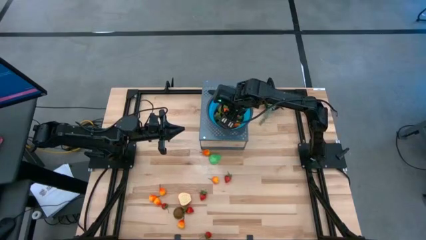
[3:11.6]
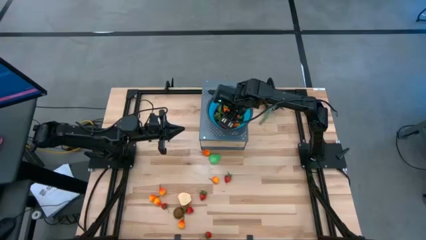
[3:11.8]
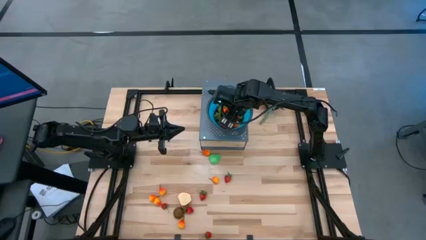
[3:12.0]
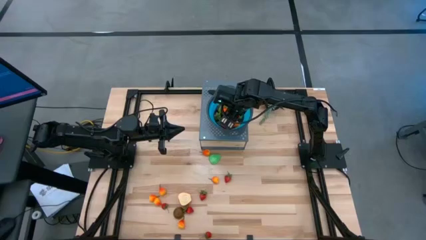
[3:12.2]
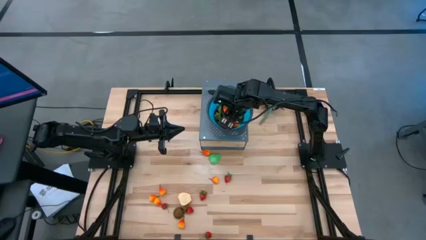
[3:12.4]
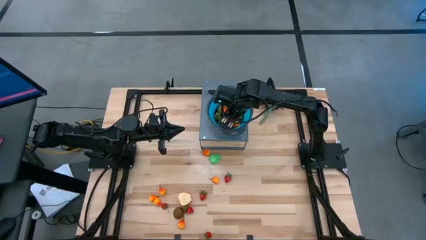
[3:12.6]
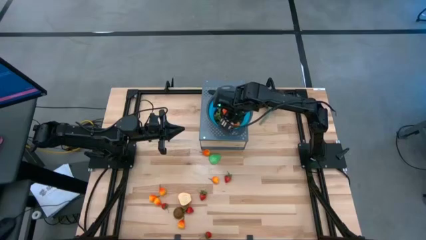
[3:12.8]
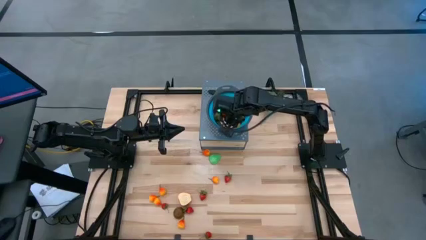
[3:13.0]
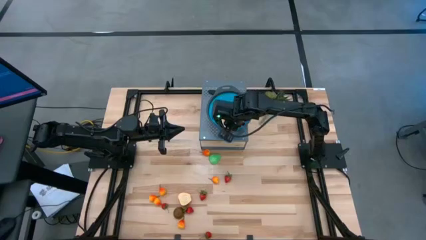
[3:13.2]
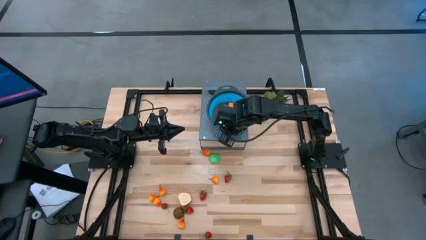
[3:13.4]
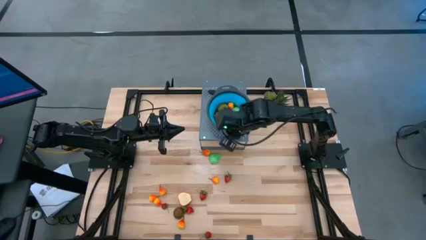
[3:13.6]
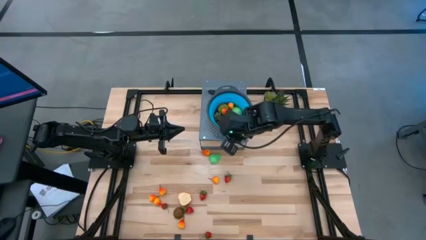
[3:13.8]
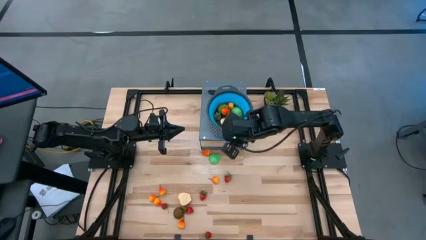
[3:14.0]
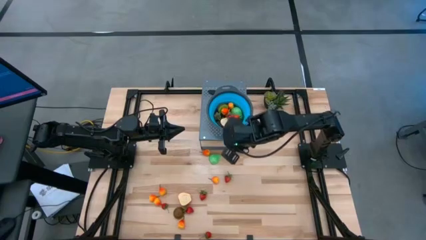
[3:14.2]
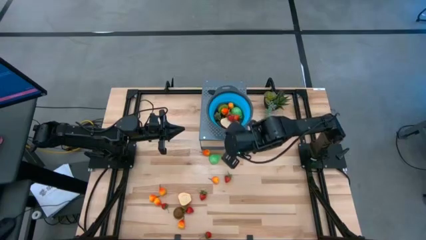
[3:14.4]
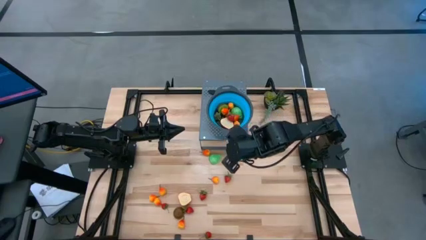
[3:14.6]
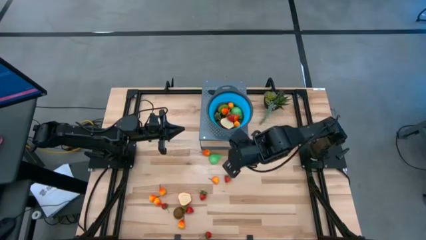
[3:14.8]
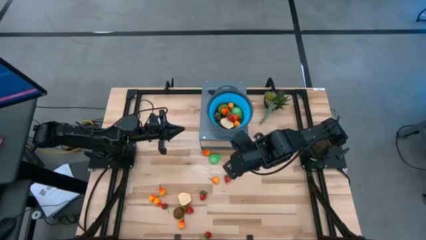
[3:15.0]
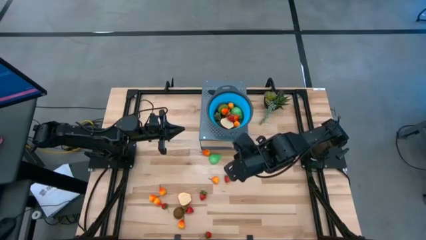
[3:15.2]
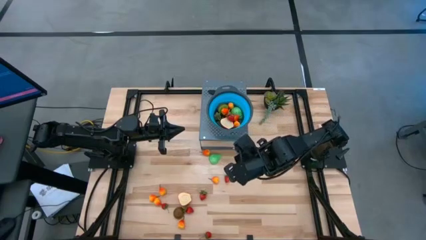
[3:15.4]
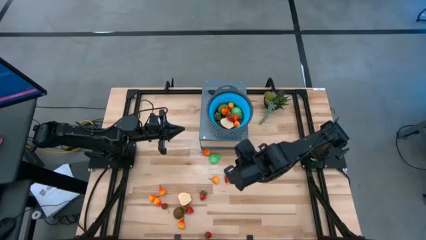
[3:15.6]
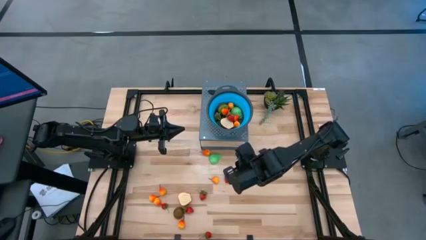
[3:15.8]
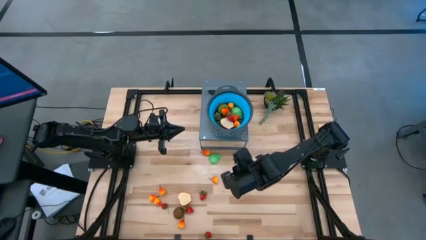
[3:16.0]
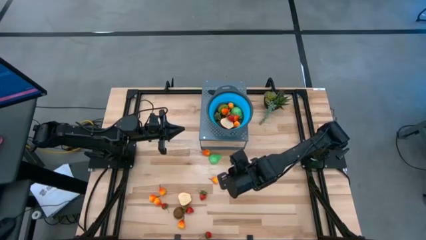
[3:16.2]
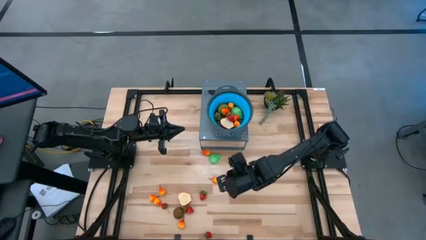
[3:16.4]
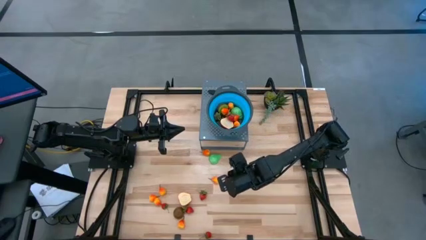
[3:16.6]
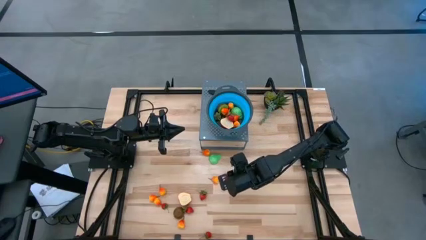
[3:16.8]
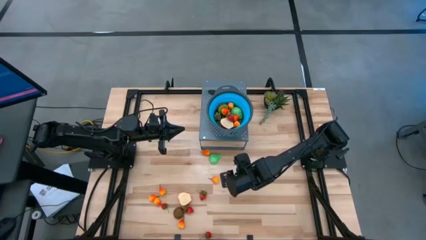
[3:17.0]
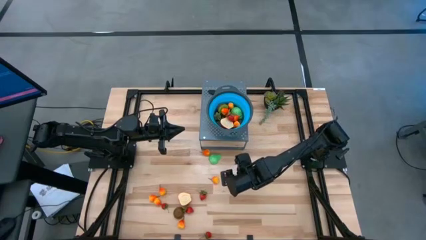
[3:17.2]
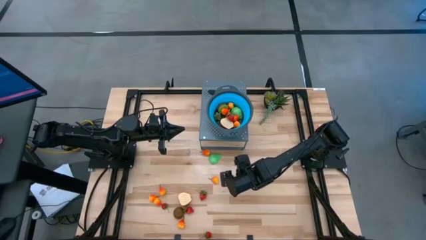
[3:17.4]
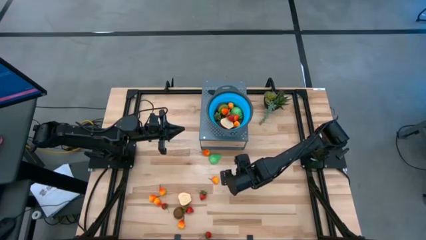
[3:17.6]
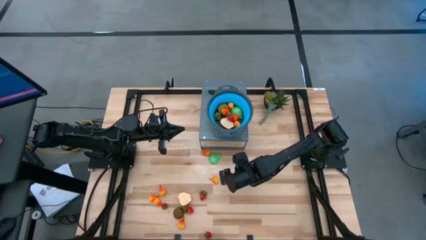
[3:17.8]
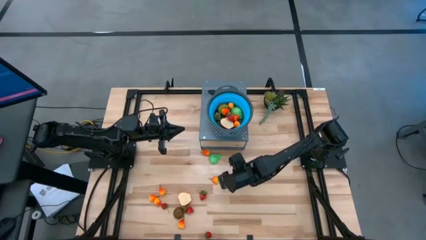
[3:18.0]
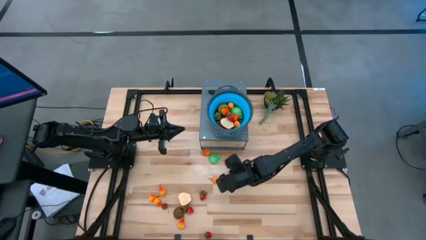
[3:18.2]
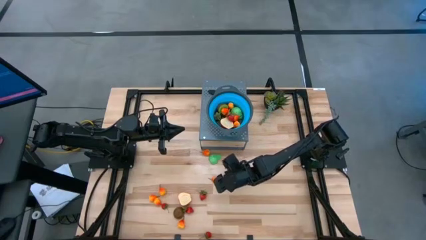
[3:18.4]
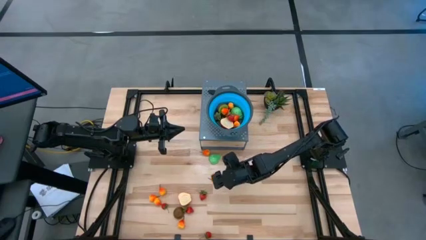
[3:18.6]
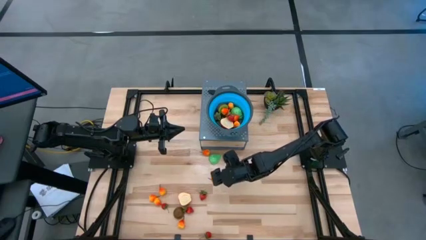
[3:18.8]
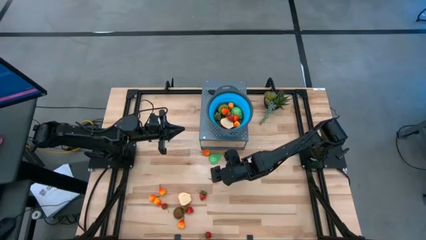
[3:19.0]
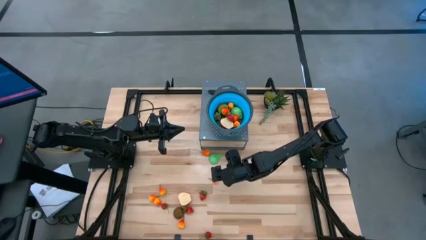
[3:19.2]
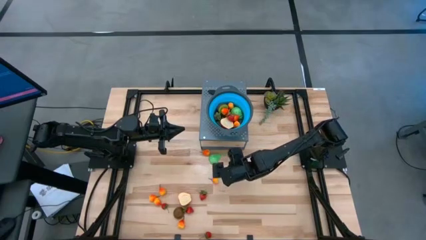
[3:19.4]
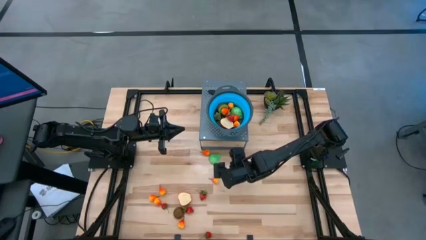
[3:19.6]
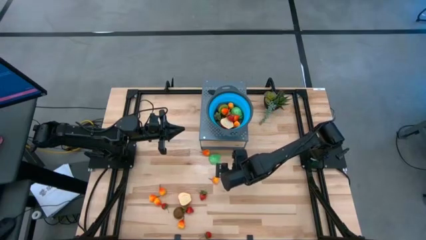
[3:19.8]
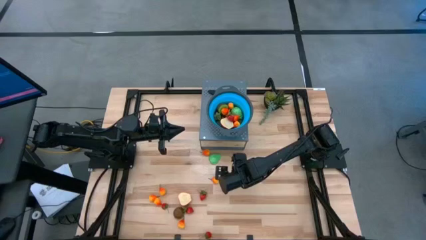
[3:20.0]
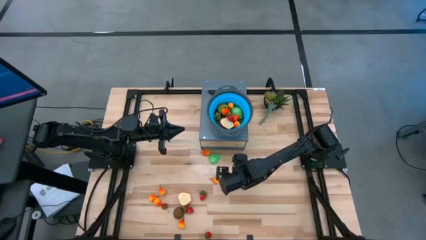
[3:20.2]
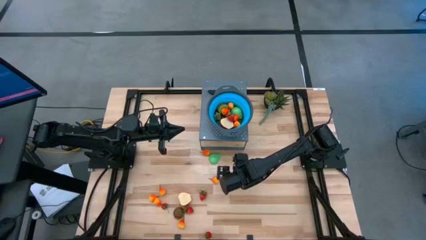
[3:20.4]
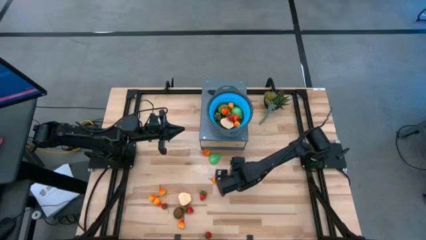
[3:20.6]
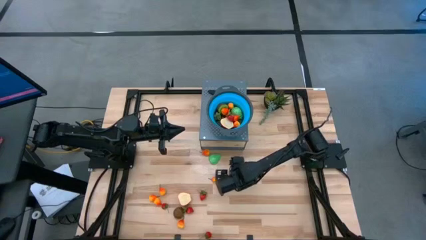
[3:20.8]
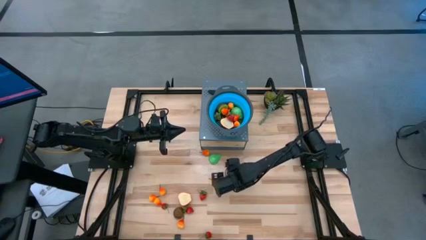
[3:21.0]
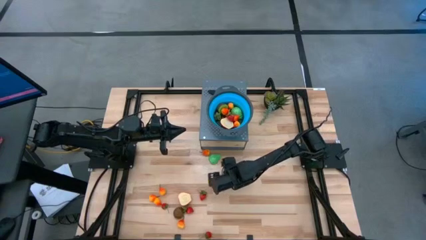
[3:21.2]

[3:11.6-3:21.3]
Task: Pick & Place Fruit
Put the strawberry into the strainer bowl

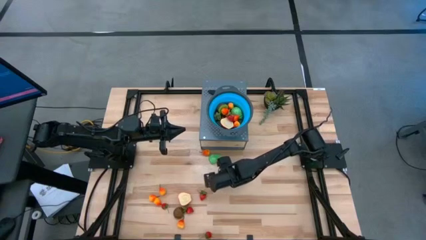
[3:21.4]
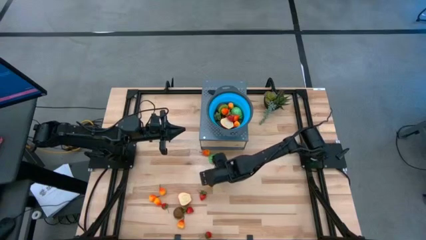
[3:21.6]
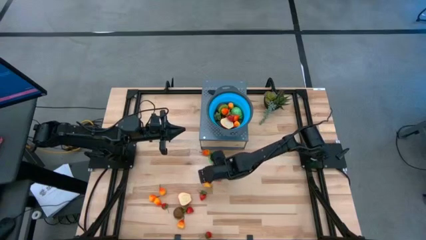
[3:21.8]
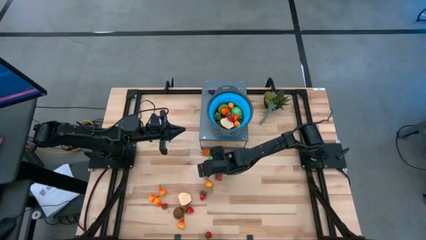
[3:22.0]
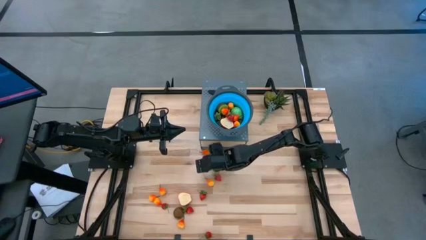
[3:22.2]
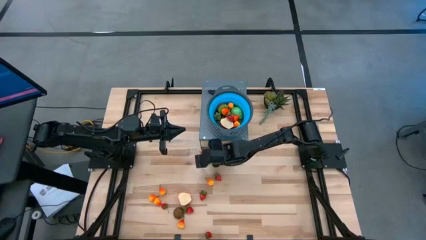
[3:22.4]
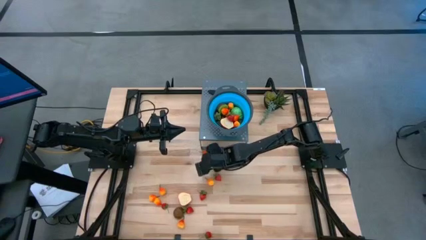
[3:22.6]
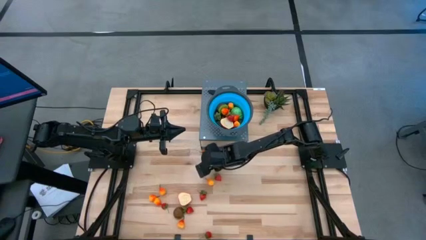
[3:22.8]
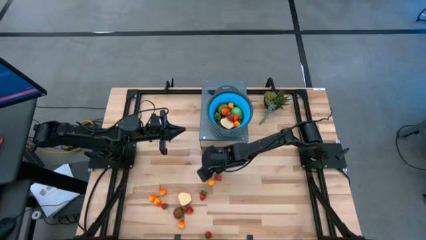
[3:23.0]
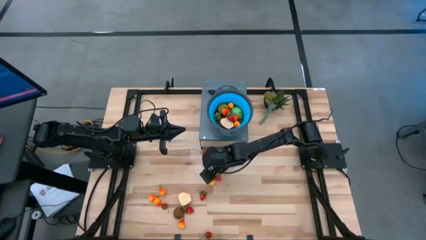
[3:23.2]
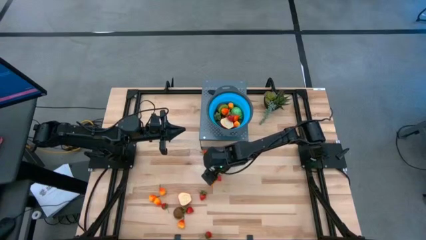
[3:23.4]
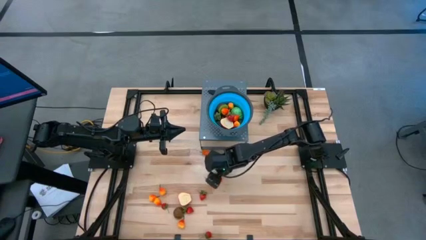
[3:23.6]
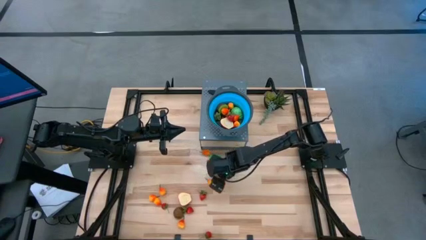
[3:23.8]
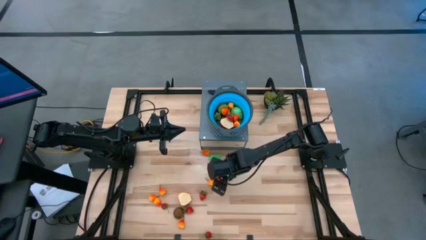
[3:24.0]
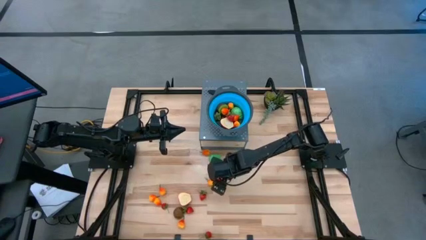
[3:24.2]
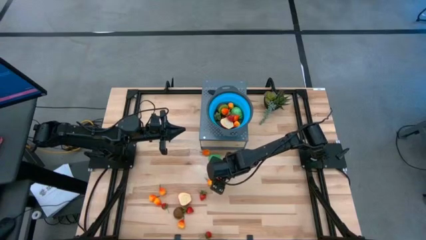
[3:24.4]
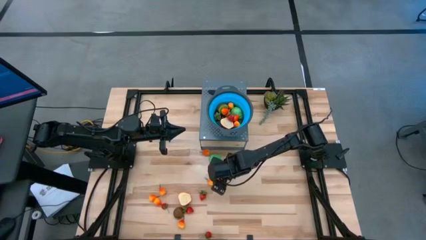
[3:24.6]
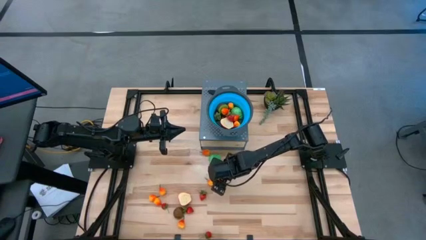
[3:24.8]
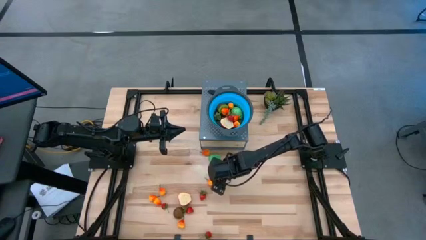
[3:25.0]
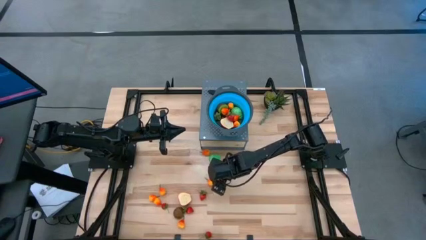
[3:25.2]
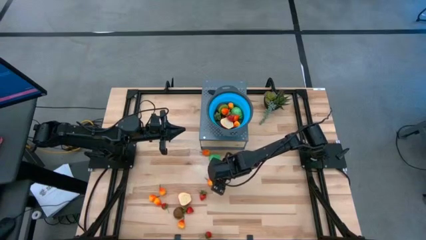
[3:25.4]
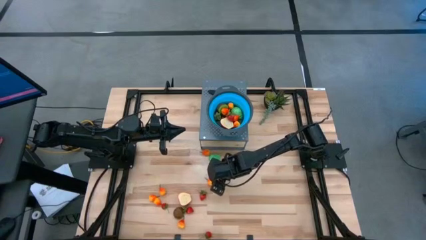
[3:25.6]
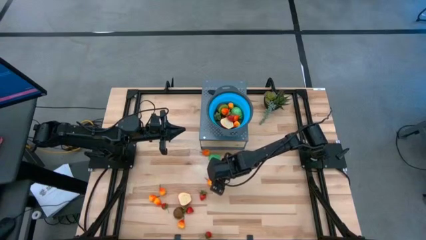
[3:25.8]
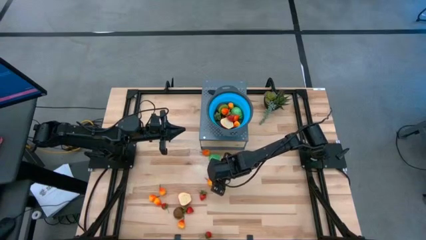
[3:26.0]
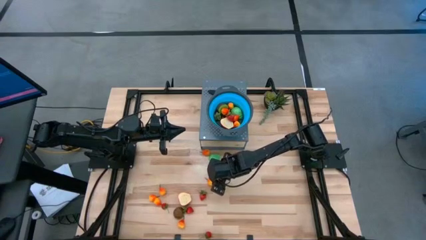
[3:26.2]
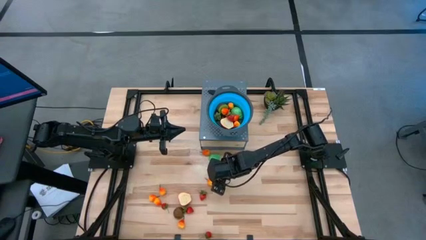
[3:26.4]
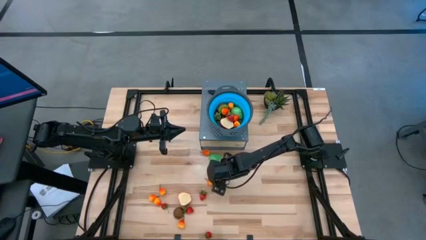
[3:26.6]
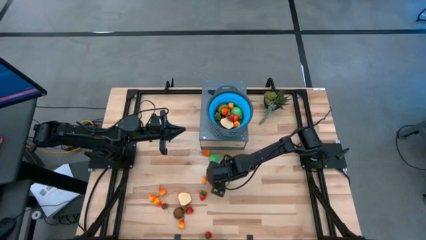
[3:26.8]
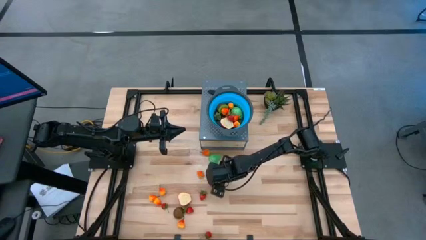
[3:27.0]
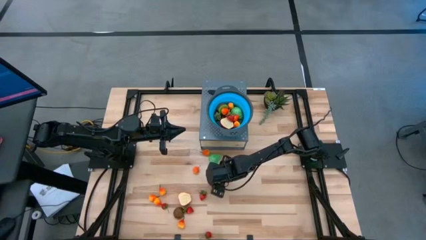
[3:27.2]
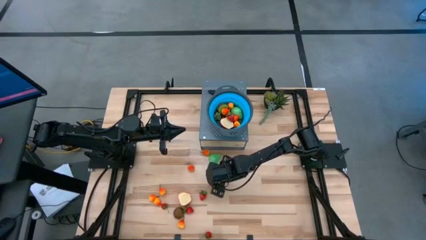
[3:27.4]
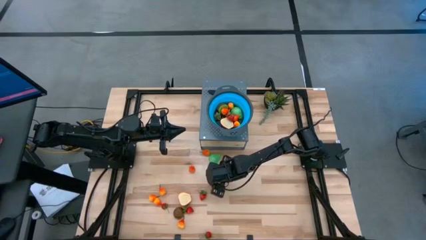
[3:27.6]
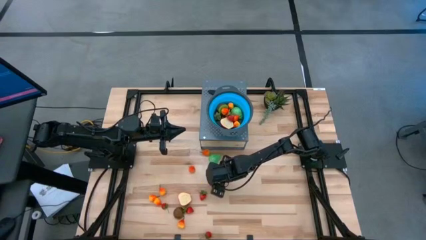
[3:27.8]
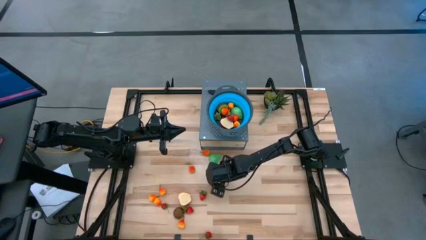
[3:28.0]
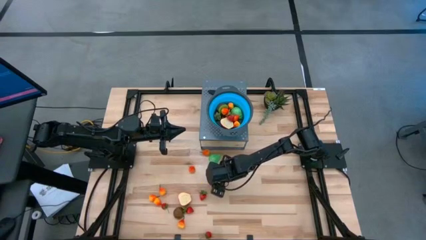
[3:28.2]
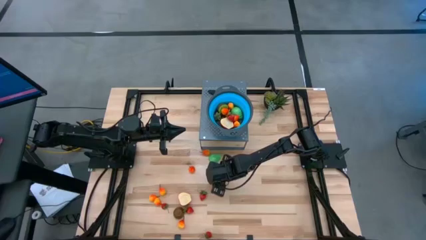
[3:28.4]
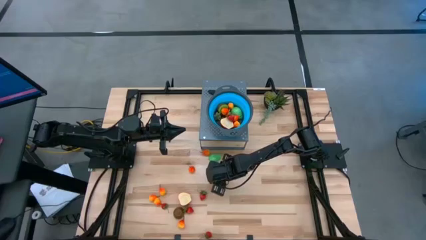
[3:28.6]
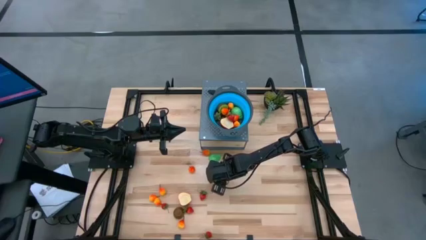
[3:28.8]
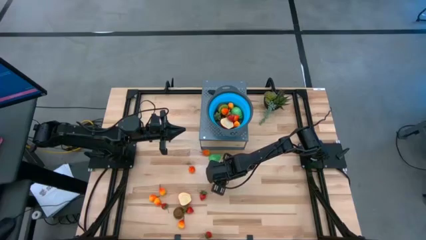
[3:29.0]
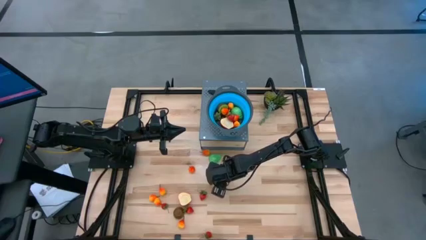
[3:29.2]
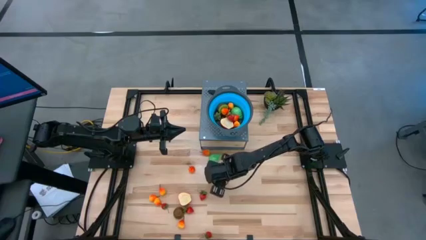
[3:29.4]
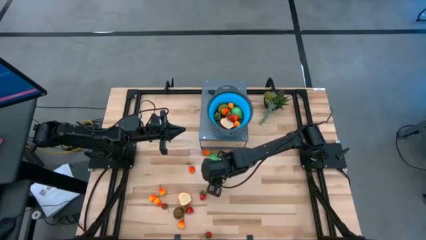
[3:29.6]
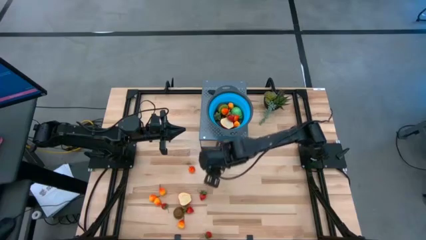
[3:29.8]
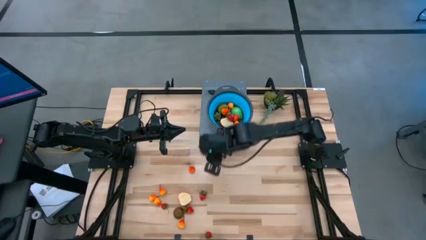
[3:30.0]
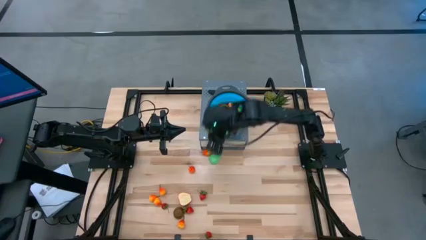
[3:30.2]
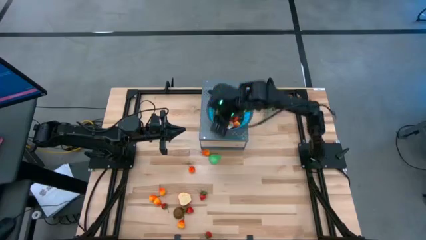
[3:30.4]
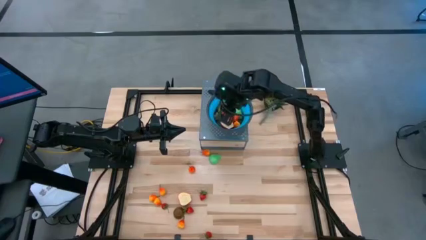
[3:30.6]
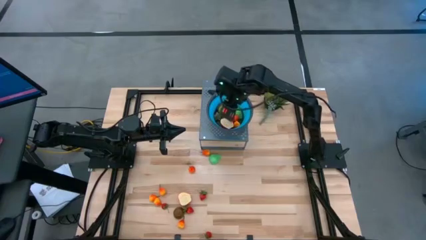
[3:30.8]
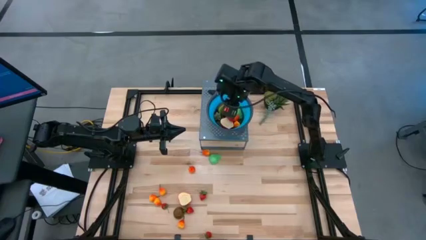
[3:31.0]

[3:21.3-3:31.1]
Put the strawberry into the strainer bowl
